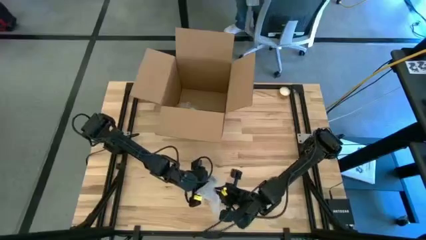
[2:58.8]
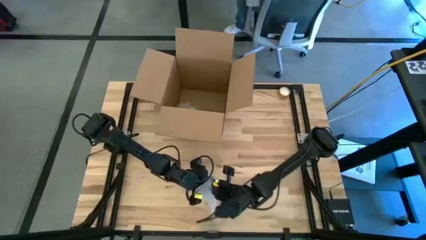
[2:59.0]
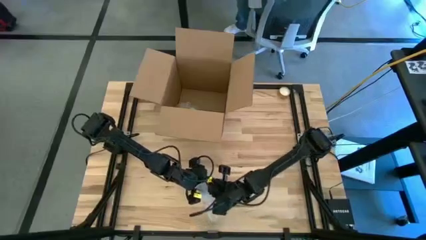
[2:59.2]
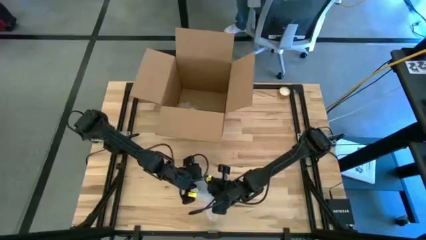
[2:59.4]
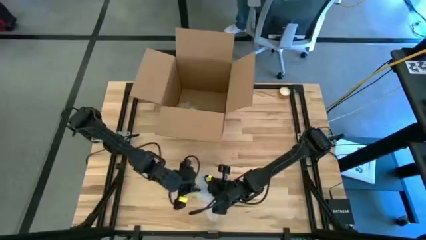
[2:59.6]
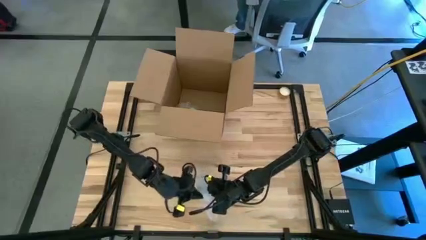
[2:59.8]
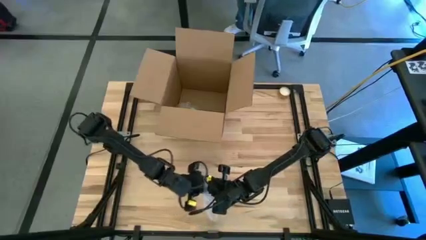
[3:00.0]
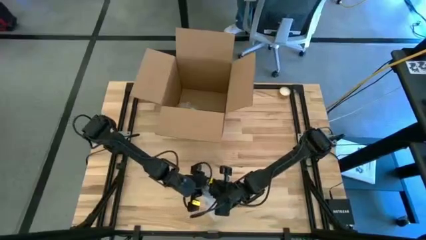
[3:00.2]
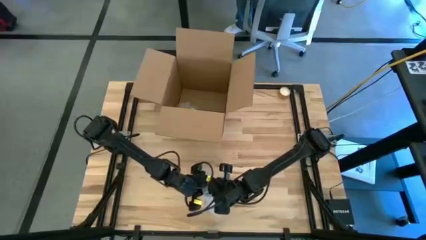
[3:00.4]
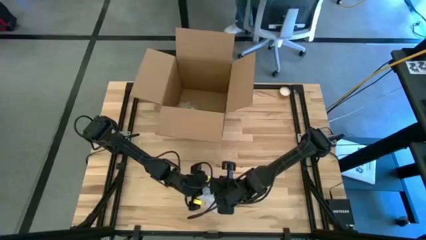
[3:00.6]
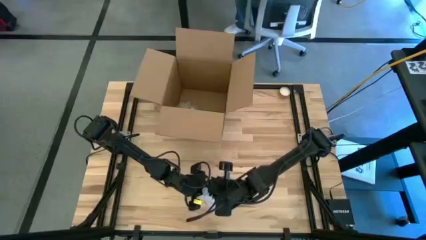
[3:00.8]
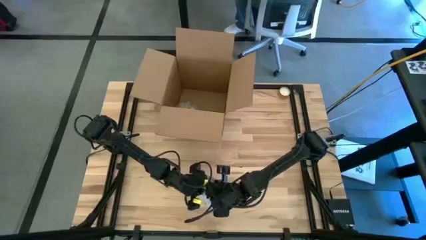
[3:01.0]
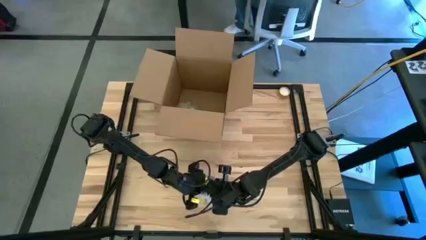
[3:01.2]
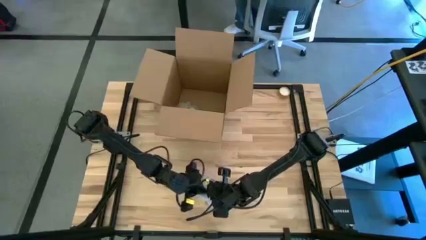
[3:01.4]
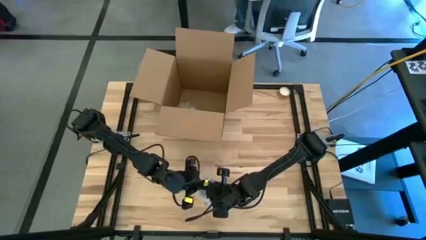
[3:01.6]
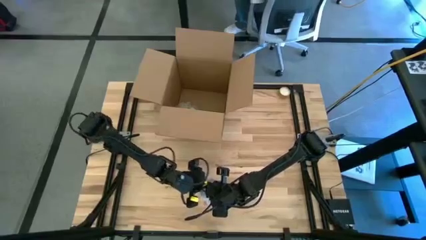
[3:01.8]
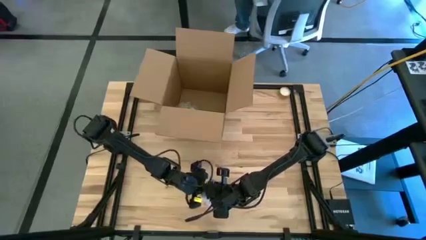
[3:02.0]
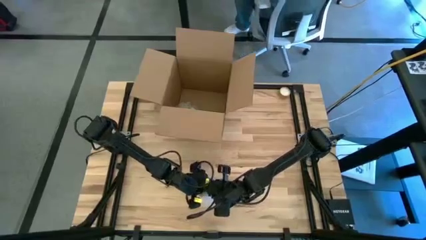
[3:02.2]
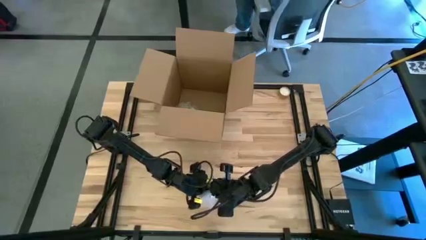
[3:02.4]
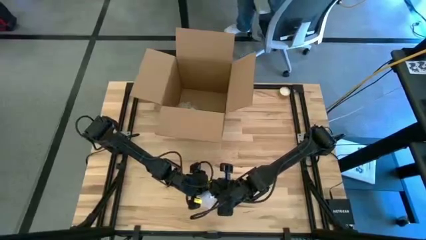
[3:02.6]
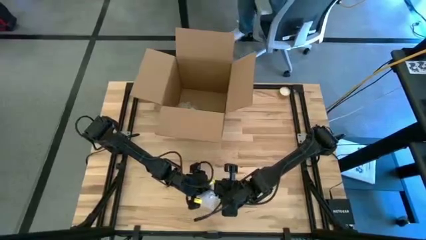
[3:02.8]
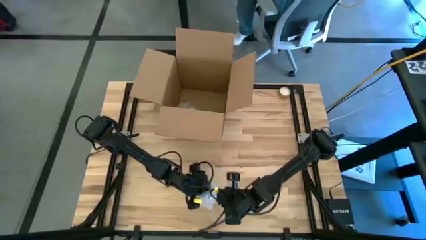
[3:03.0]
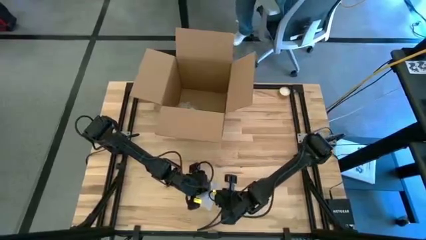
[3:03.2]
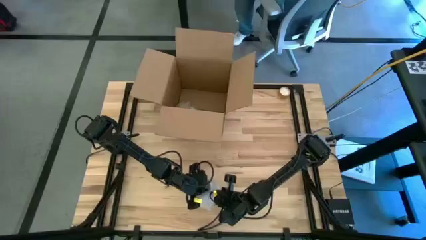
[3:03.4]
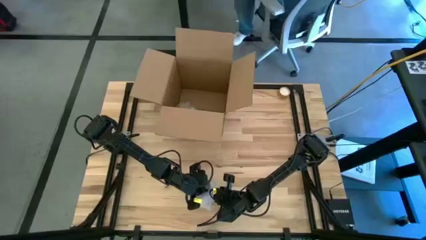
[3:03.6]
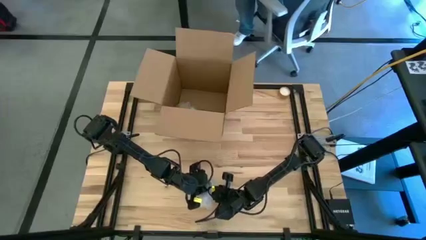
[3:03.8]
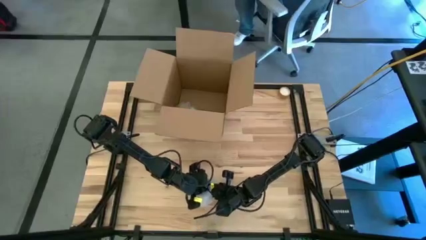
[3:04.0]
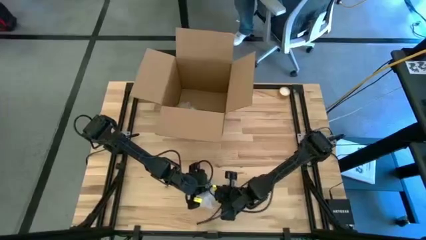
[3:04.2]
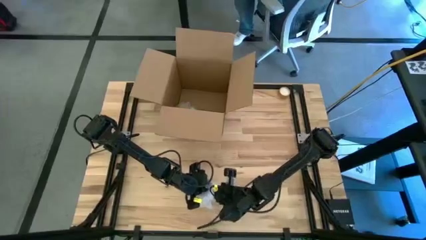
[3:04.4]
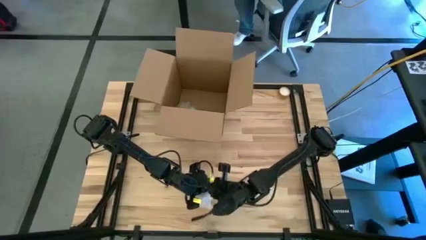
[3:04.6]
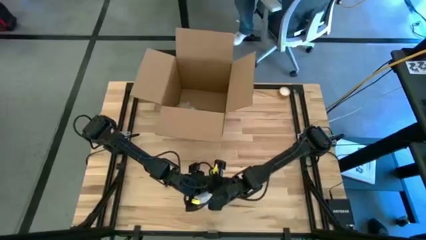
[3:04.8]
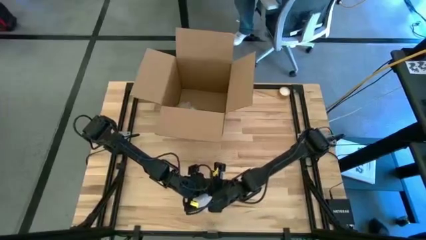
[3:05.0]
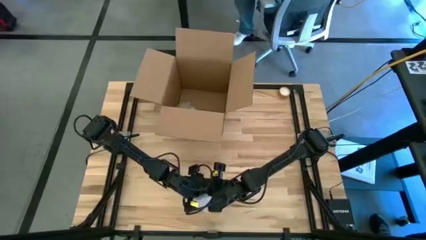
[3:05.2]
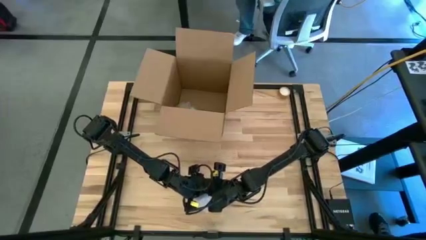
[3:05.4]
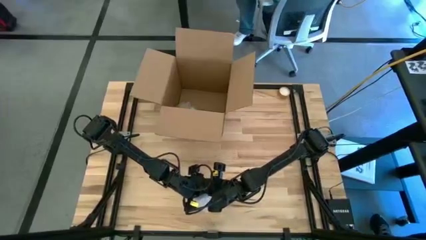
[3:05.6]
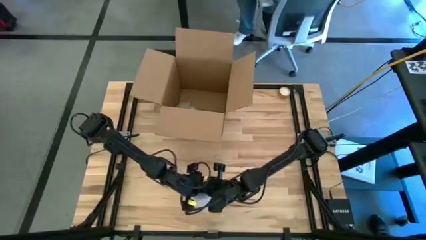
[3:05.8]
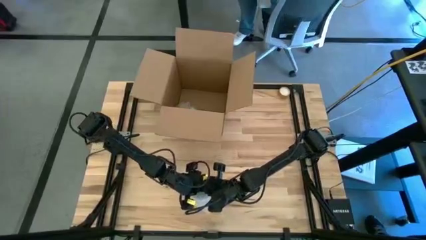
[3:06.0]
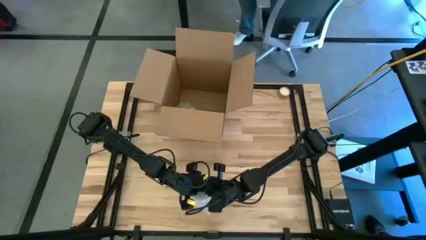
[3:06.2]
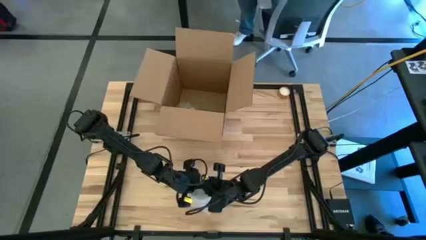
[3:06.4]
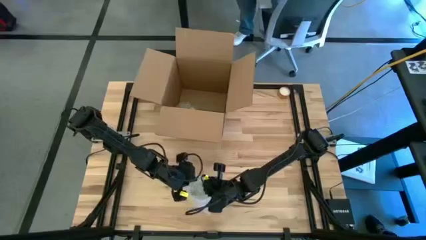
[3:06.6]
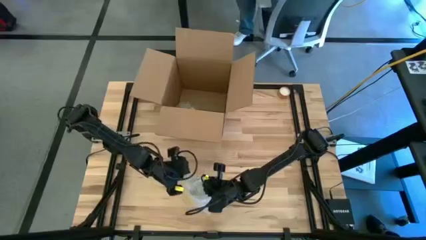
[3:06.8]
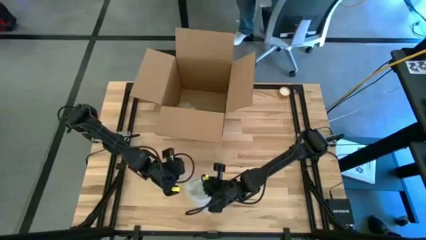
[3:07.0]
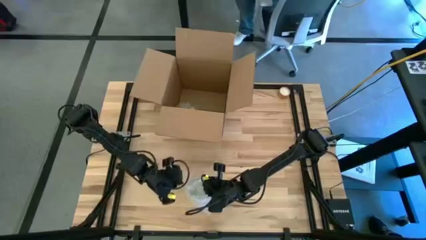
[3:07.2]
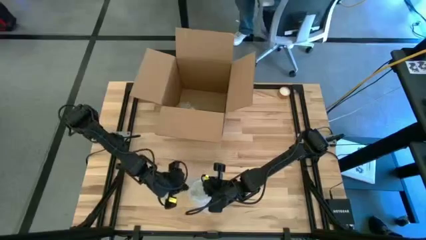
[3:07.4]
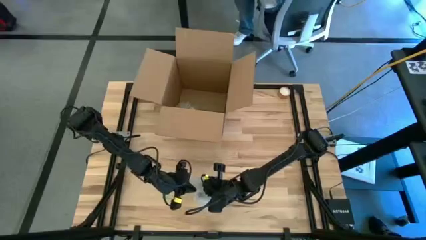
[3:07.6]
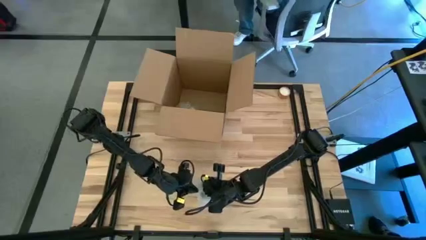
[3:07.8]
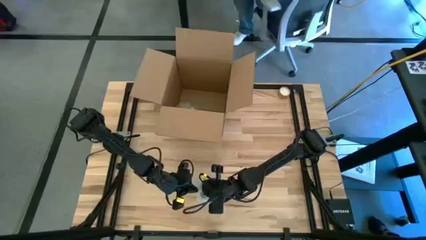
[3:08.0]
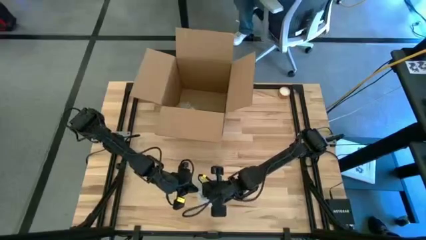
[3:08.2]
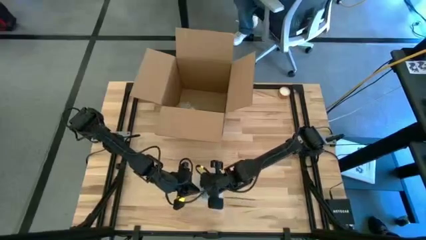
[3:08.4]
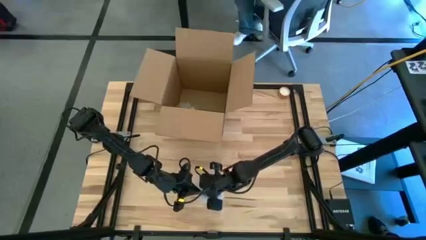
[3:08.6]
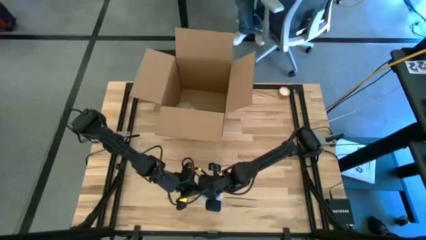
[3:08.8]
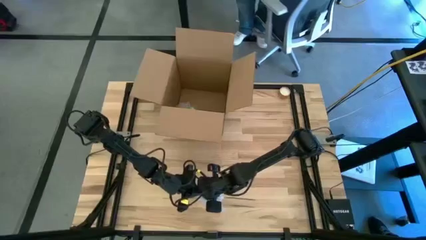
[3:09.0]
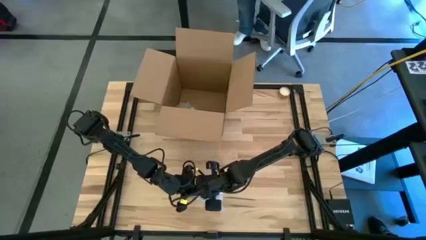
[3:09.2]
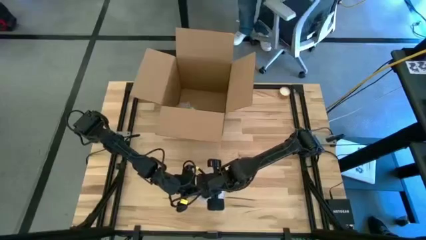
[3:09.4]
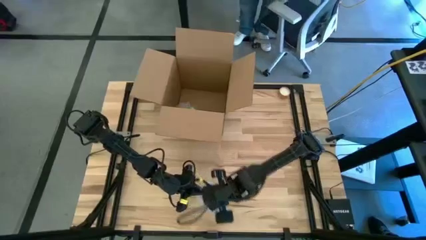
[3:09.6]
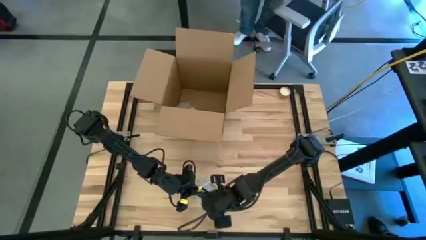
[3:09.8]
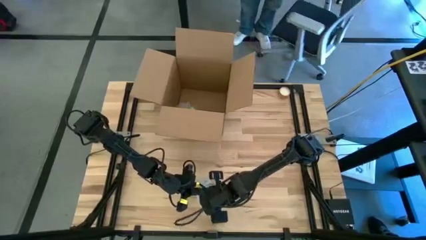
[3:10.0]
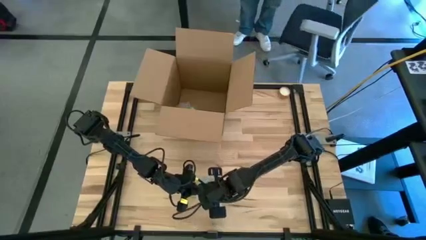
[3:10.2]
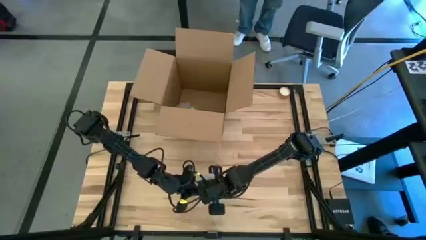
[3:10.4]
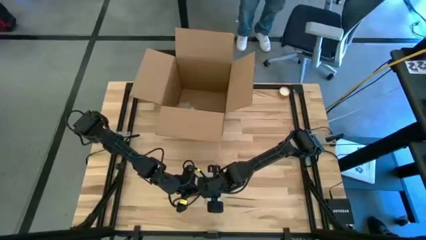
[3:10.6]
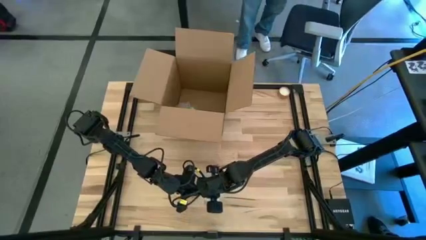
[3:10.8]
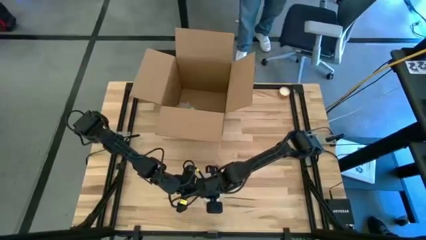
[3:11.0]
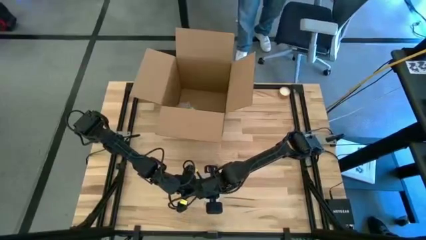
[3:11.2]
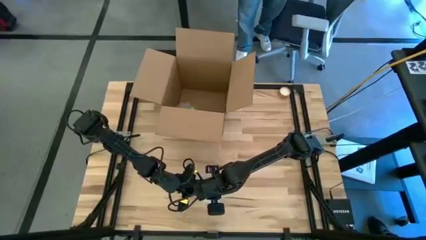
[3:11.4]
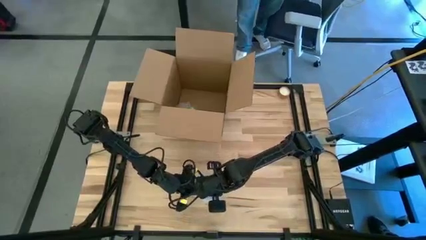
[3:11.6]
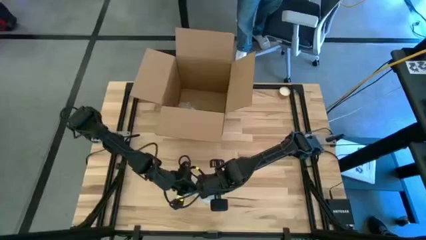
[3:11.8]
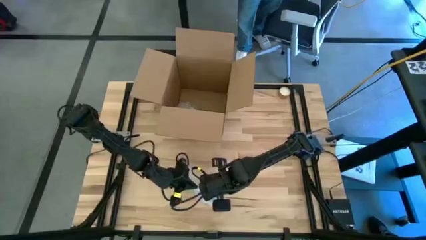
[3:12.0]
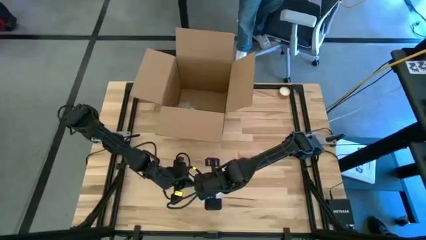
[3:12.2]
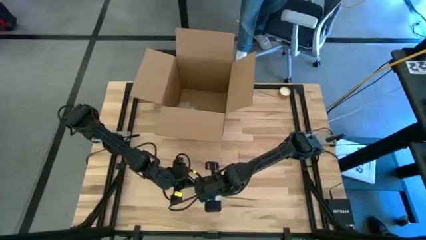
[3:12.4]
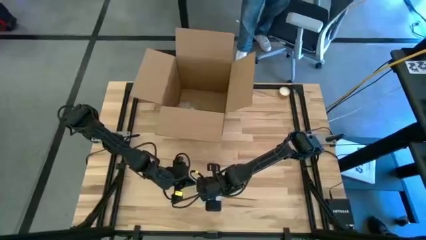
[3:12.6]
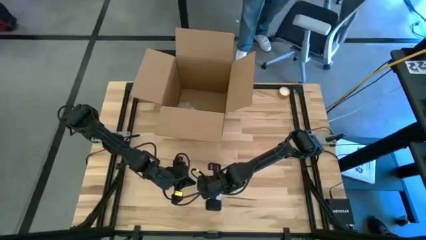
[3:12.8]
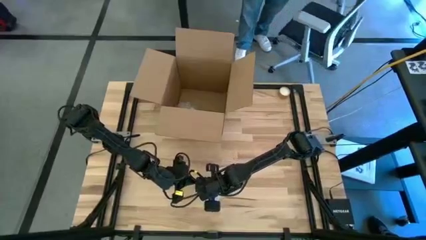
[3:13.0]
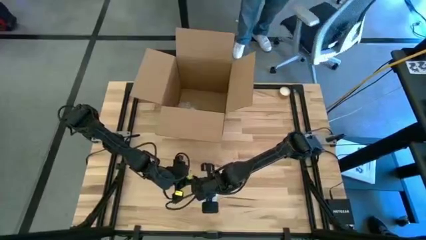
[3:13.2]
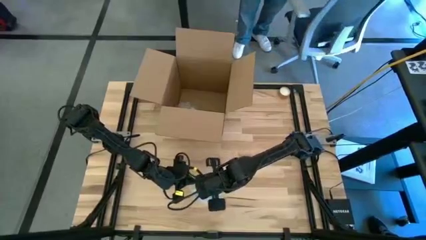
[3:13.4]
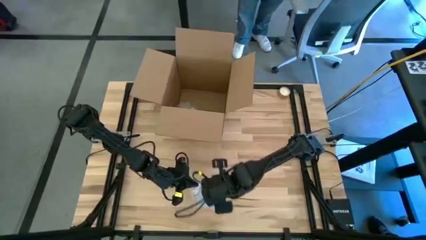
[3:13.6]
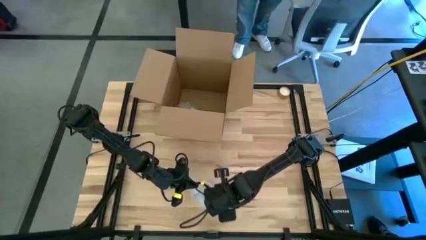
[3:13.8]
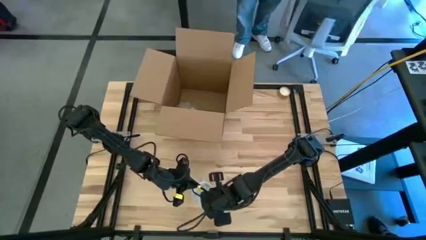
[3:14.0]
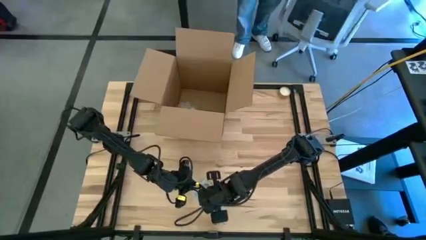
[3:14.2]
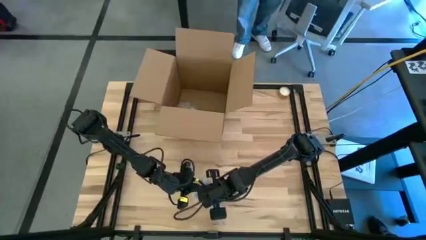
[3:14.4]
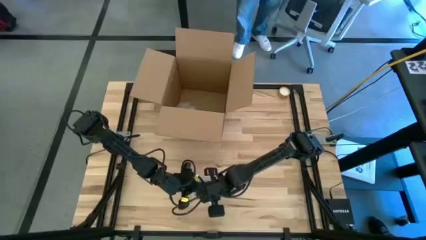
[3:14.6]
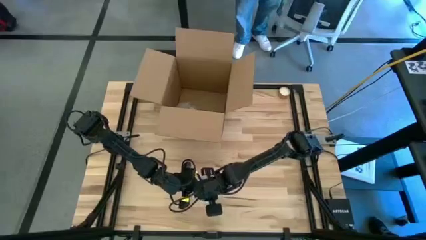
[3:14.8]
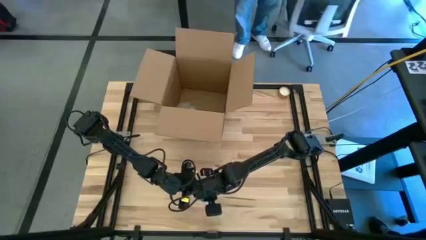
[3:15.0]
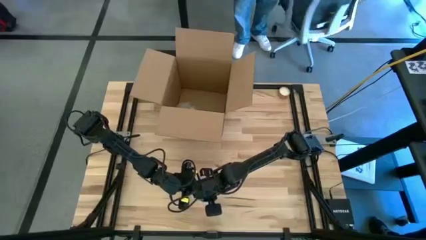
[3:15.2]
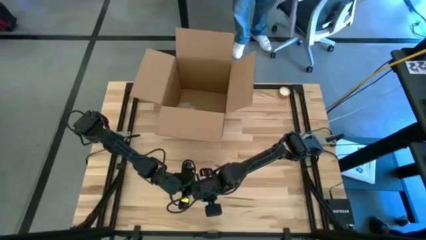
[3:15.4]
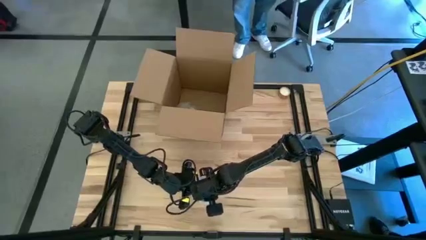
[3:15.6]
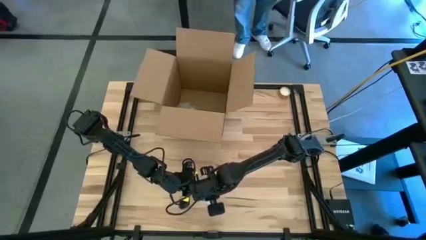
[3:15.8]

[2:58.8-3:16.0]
Task: wrap mug
Wrap the white mug with transparent bubble wrap
